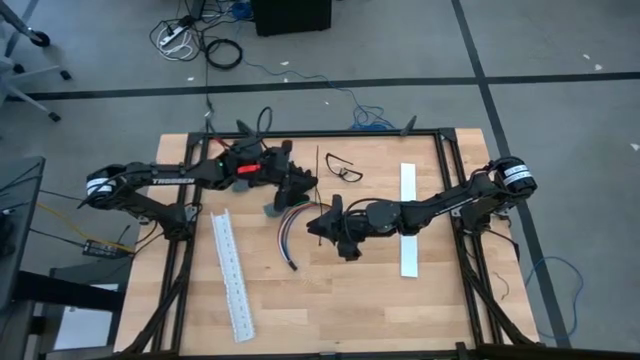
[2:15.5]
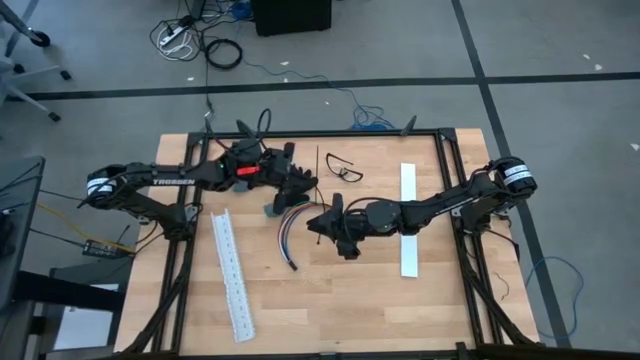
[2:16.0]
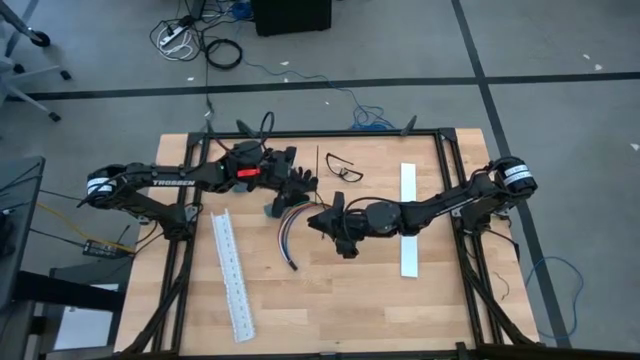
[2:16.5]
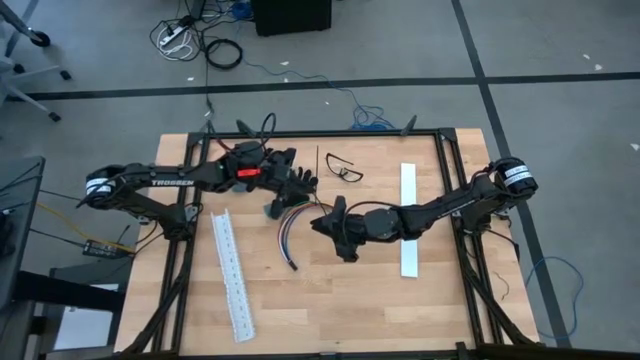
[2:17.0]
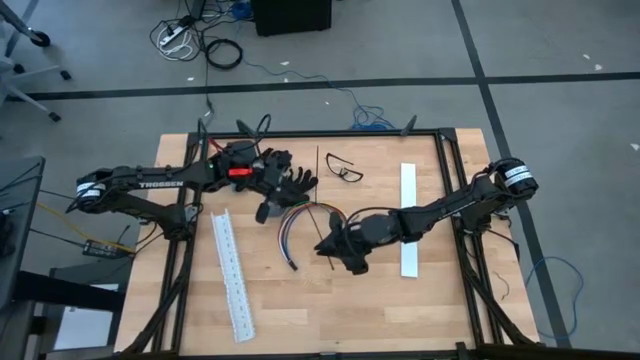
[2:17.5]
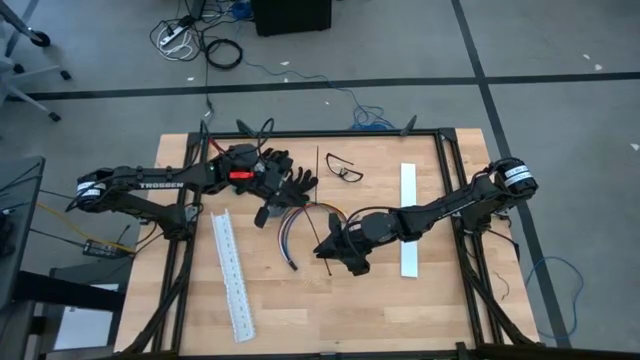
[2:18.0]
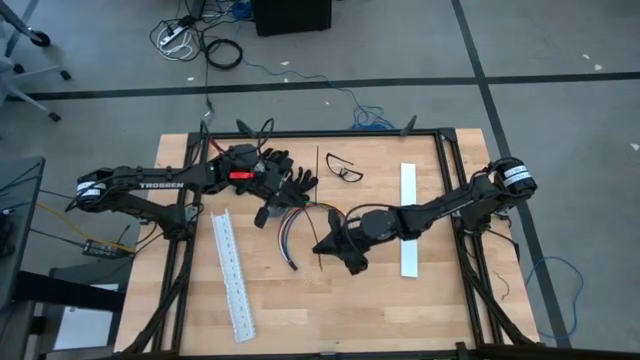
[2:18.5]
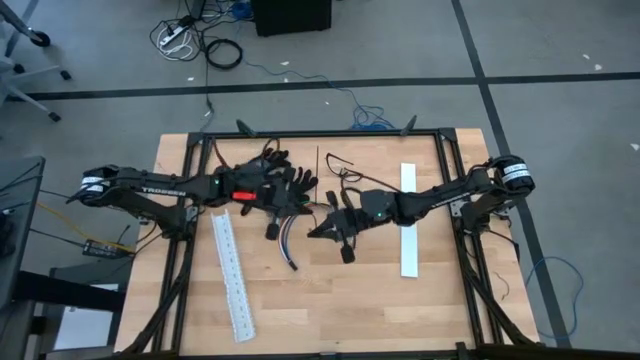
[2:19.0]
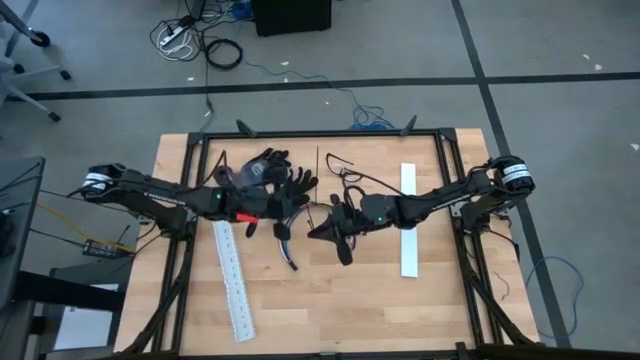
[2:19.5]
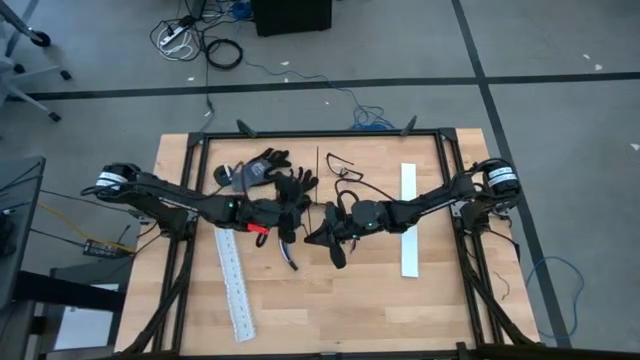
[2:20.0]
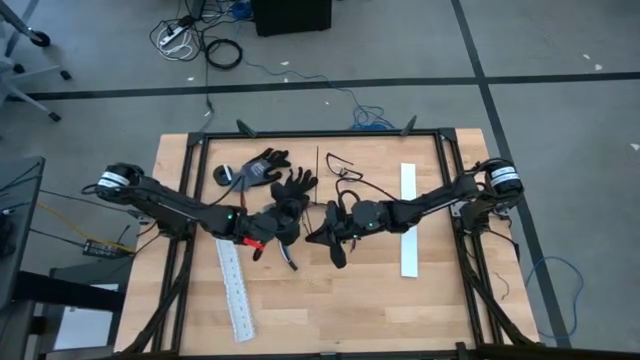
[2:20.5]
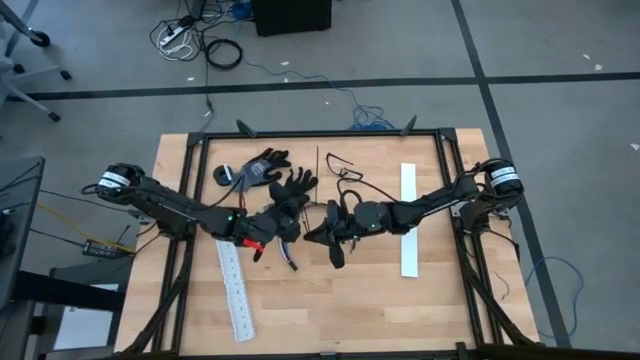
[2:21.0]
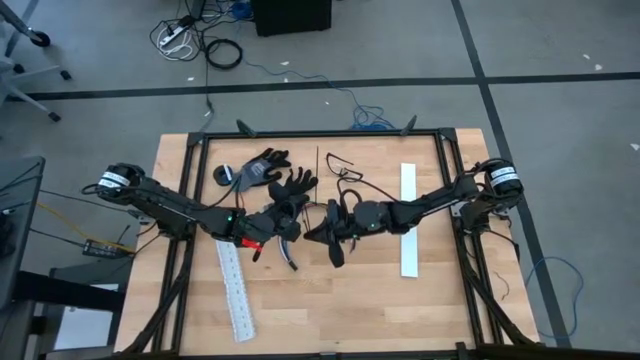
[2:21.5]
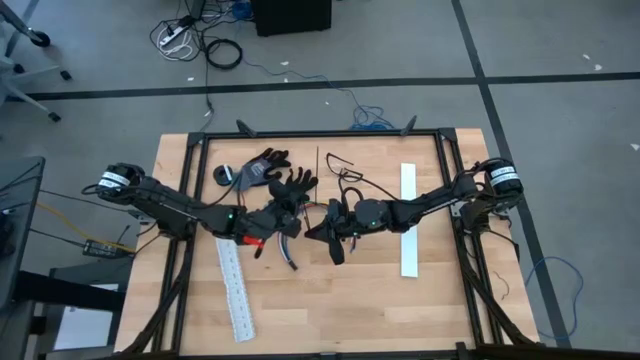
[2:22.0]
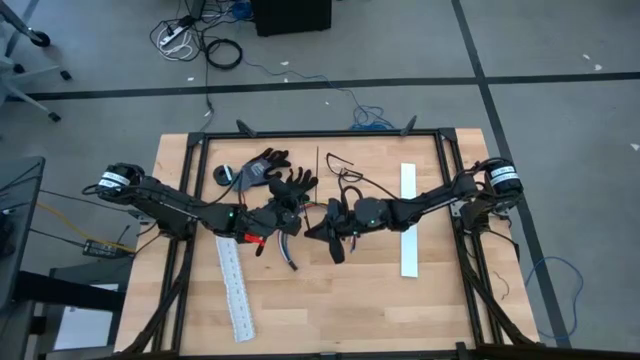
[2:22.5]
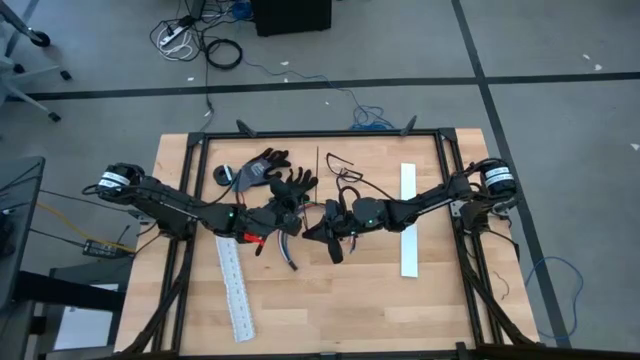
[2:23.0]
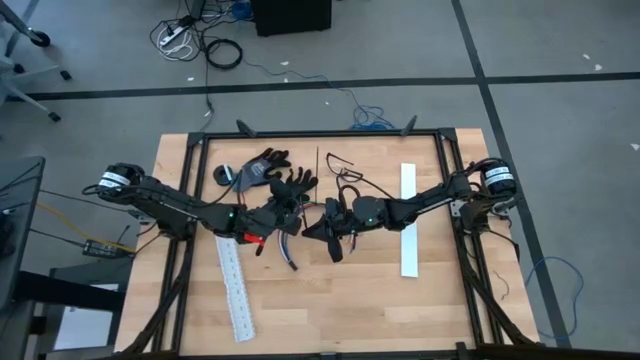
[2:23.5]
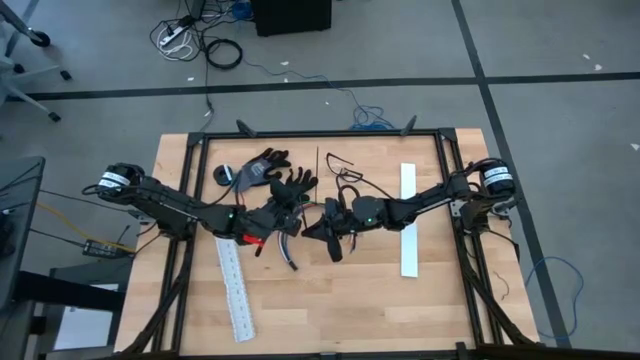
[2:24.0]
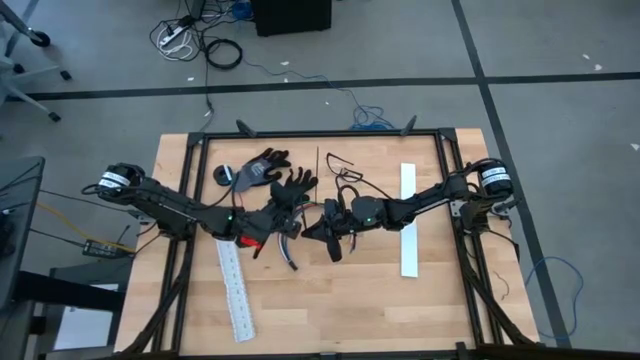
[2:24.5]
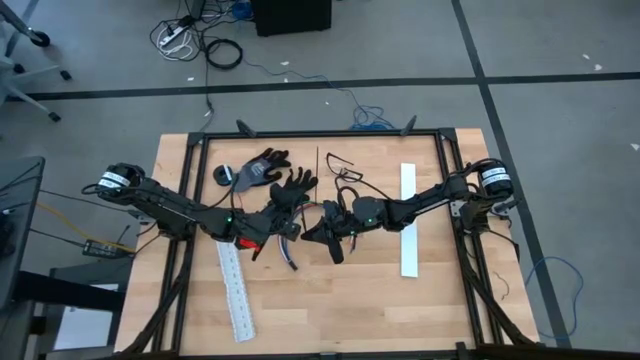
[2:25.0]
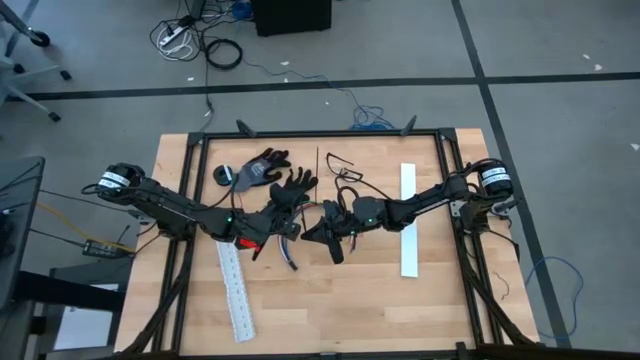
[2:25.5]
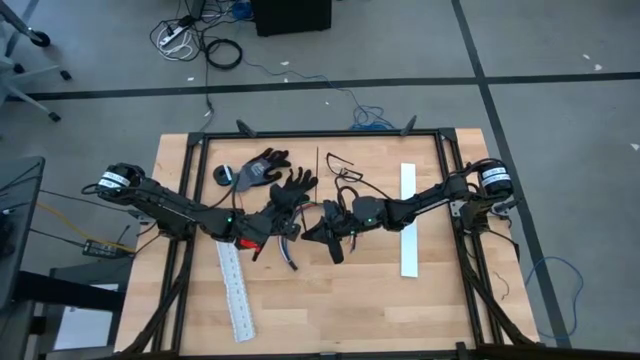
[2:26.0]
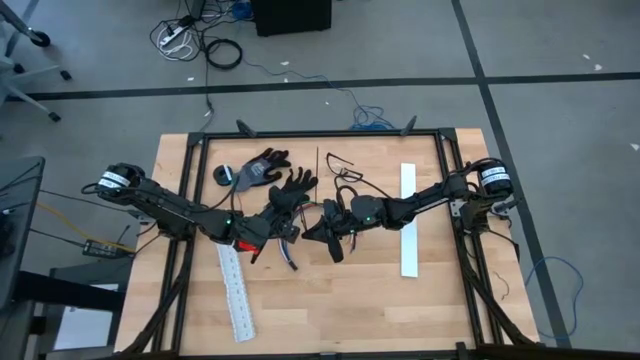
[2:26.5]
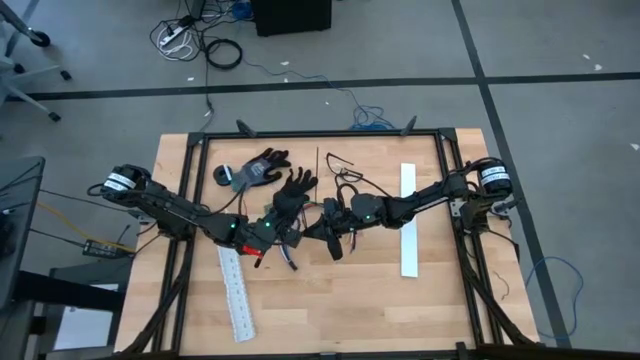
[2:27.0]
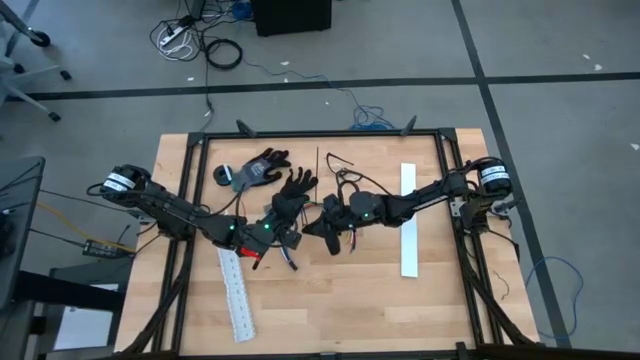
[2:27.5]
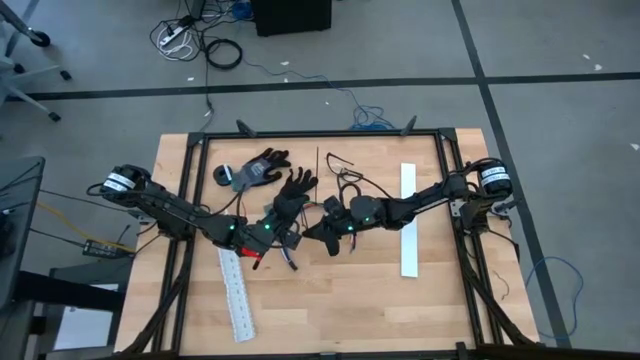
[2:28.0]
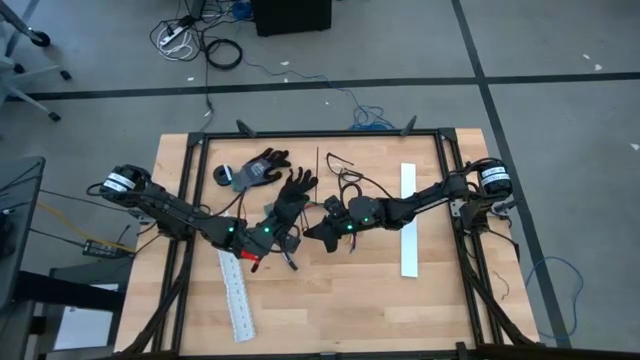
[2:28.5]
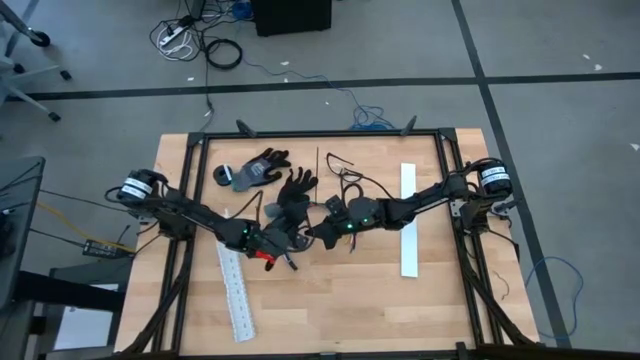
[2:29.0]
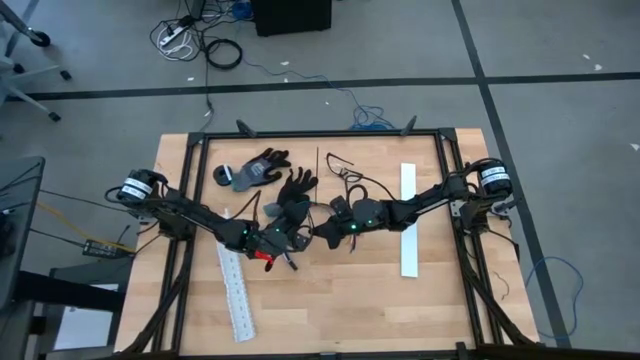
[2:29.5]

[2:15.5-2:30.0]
Task: Ziptie cables
Insert the black zip tie pointed tail end through the slot to form a loop

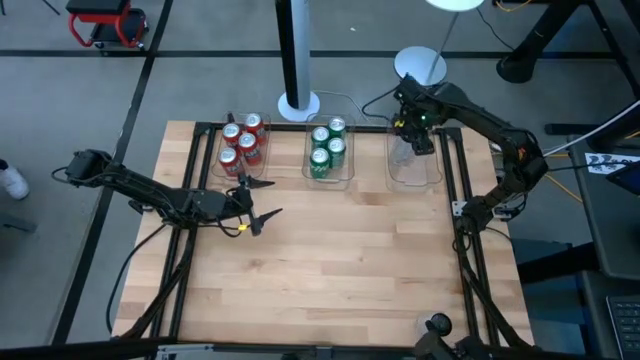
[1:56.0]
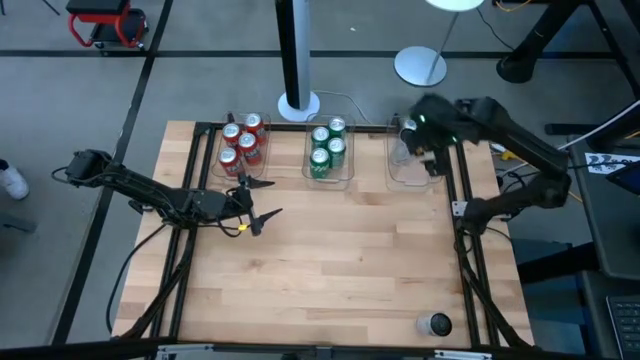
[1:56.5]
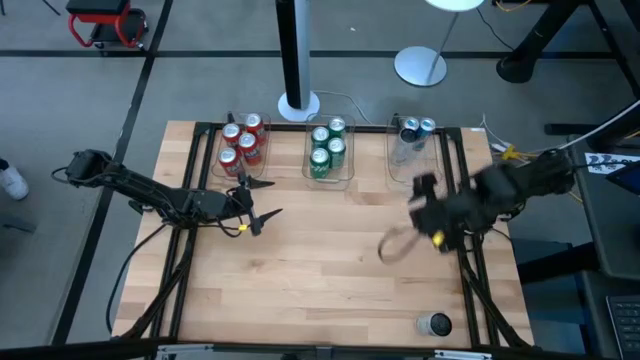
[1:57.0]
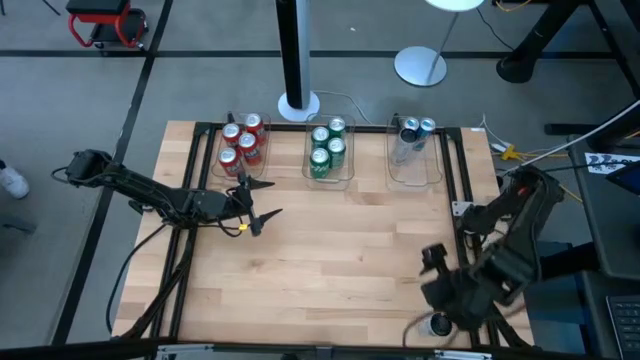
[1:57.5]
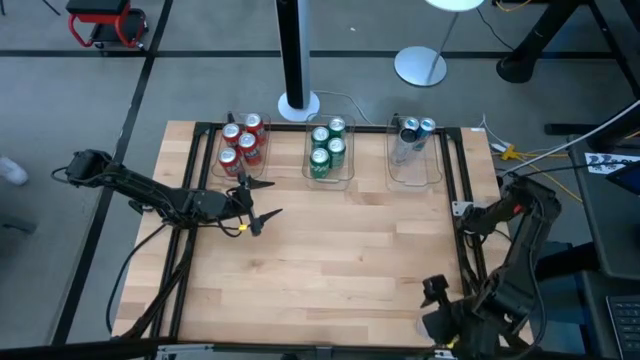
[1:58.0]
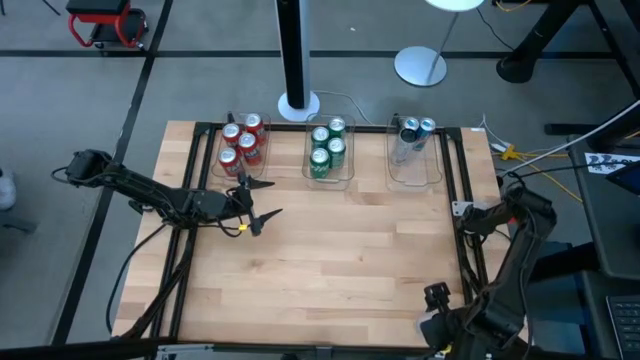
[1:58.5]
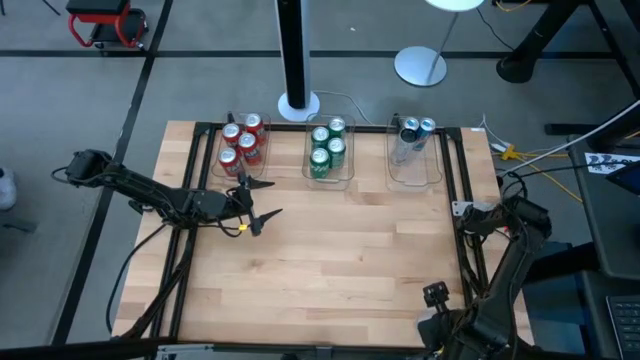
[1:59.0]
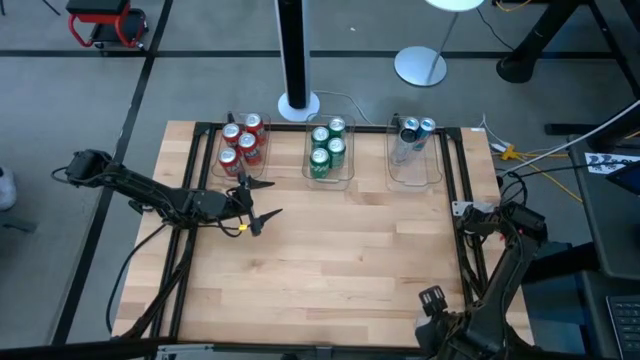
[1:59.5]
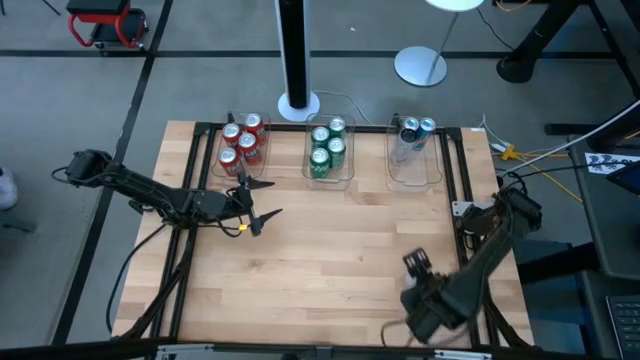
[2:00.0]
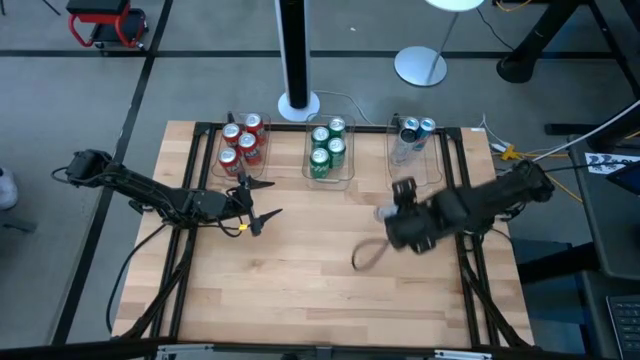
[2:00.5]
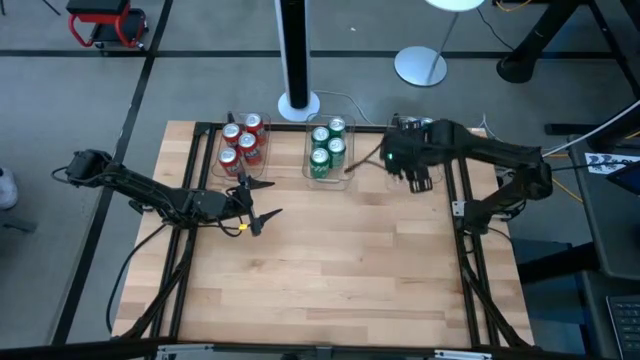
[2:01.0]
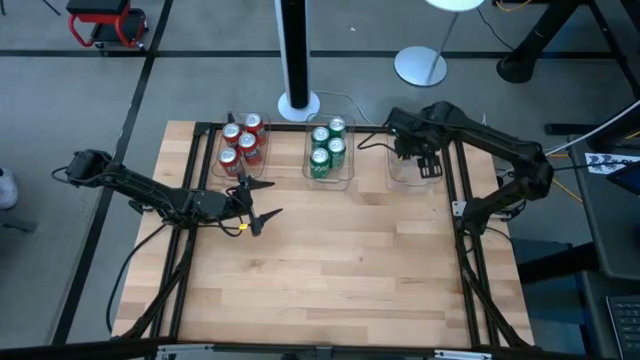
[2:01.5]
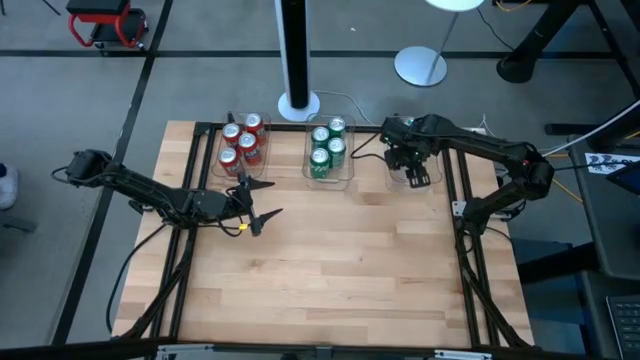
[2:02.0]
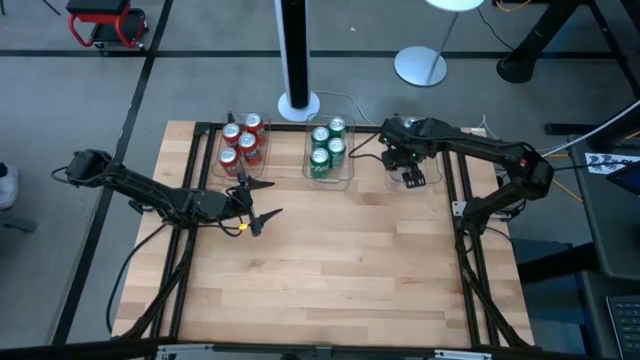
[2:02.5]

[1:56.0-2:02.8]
Task: Sort soda cans
Put the white-pink soda can into the right transparent bin
